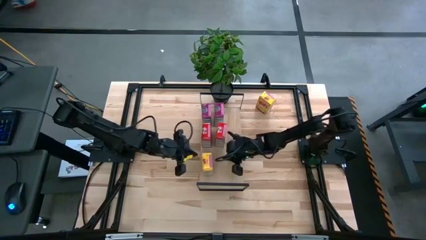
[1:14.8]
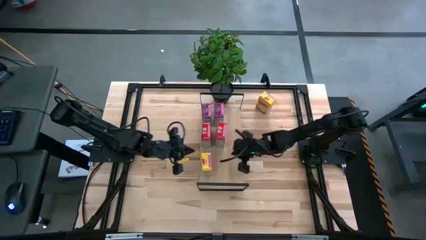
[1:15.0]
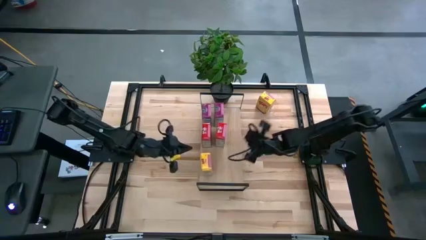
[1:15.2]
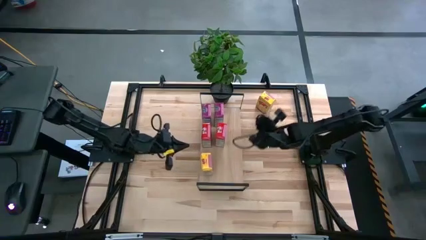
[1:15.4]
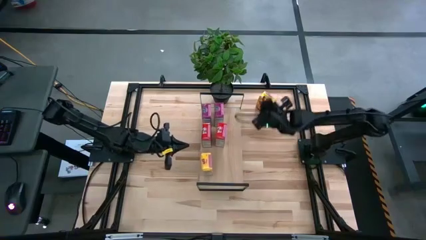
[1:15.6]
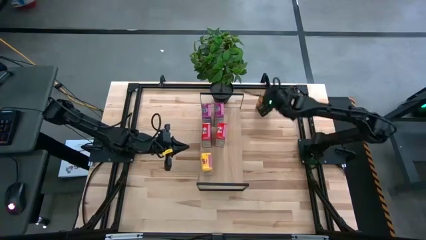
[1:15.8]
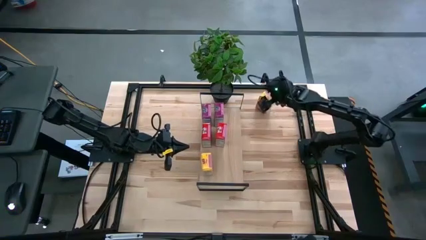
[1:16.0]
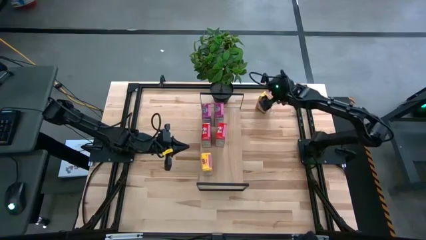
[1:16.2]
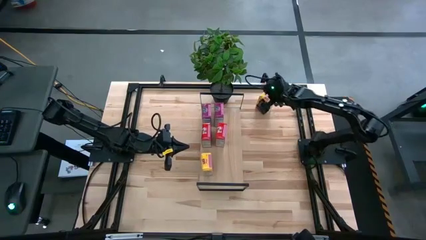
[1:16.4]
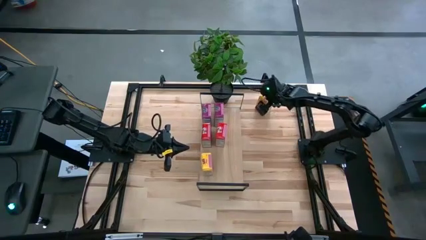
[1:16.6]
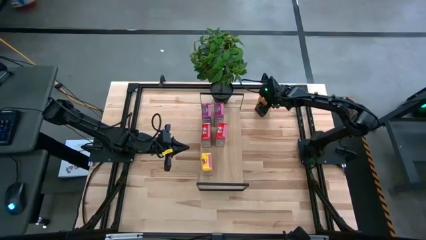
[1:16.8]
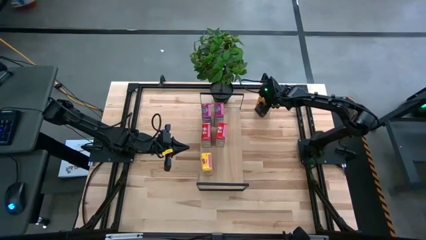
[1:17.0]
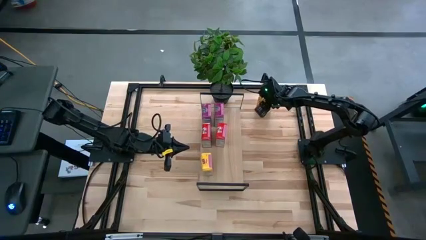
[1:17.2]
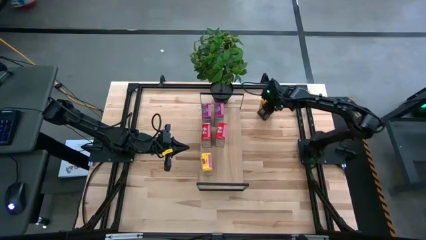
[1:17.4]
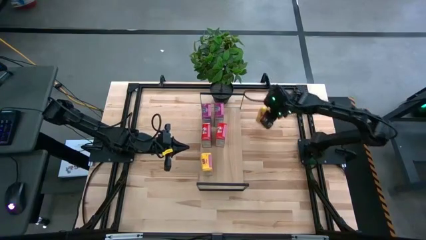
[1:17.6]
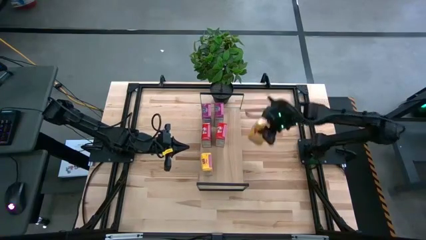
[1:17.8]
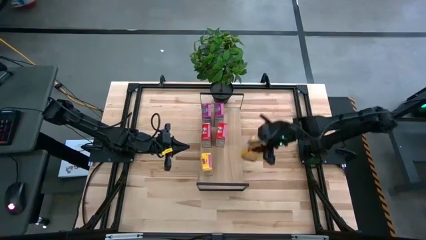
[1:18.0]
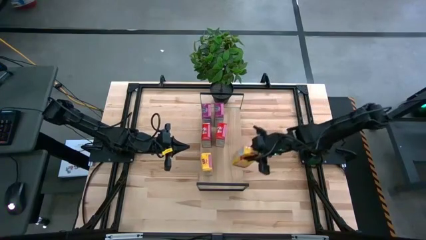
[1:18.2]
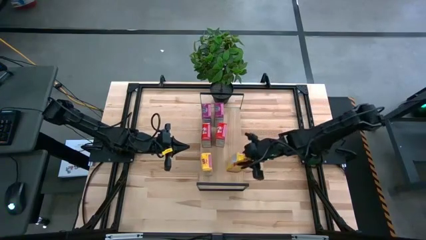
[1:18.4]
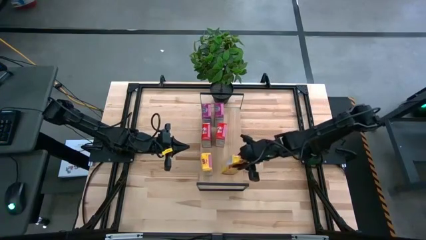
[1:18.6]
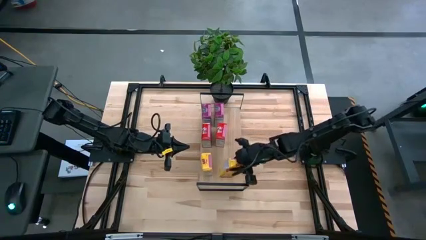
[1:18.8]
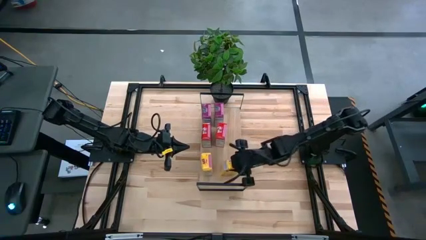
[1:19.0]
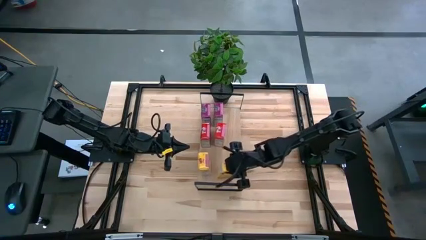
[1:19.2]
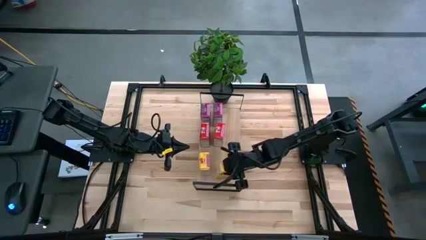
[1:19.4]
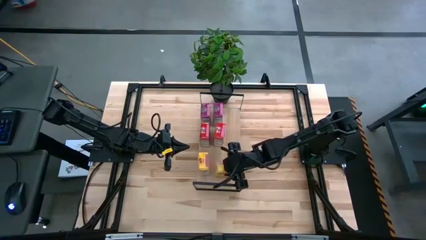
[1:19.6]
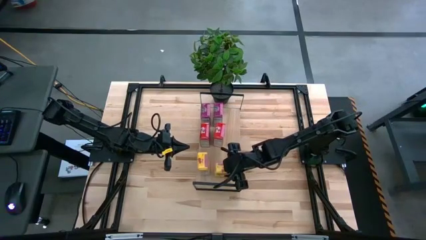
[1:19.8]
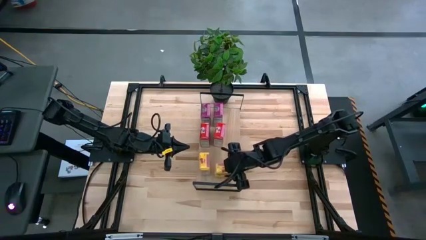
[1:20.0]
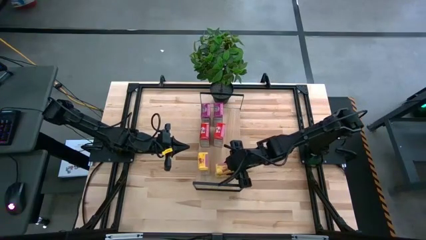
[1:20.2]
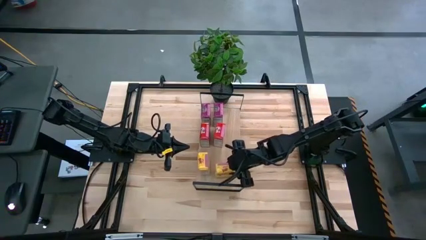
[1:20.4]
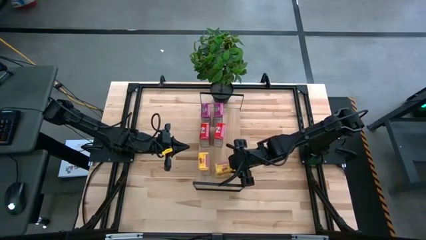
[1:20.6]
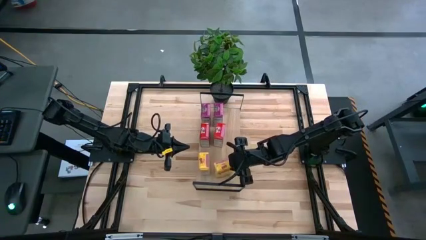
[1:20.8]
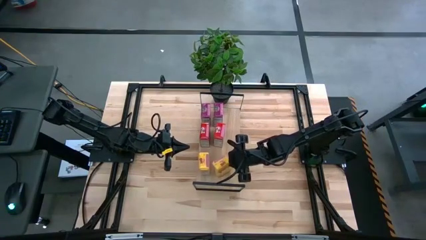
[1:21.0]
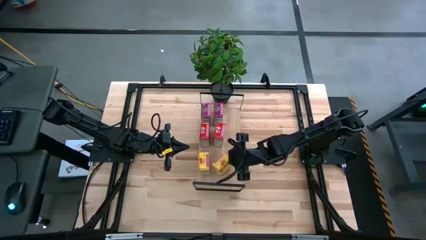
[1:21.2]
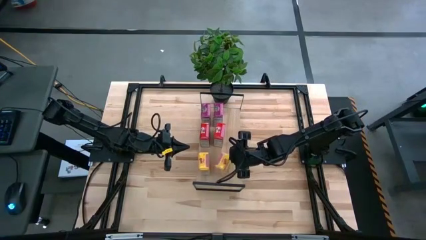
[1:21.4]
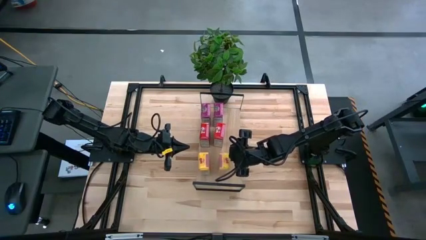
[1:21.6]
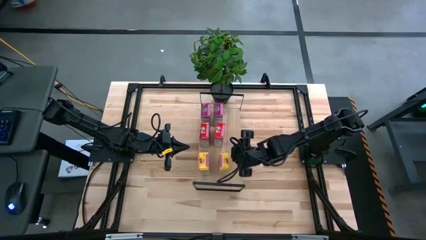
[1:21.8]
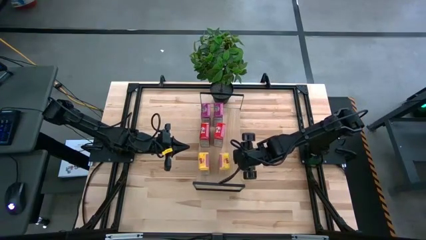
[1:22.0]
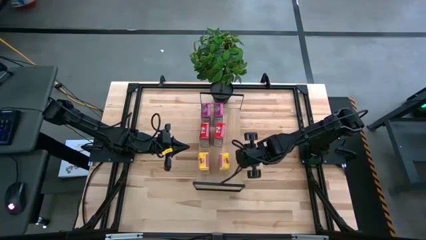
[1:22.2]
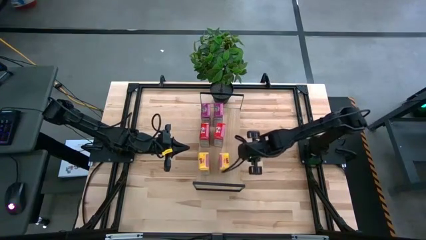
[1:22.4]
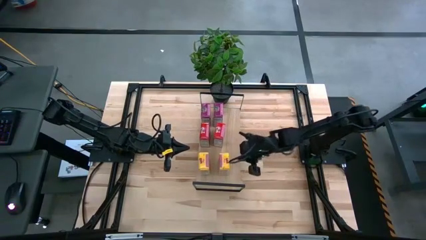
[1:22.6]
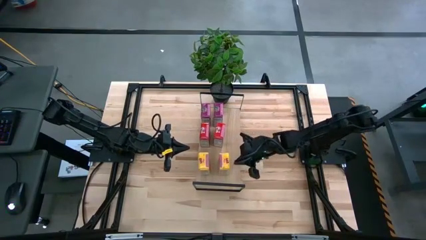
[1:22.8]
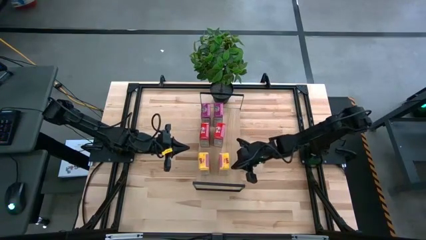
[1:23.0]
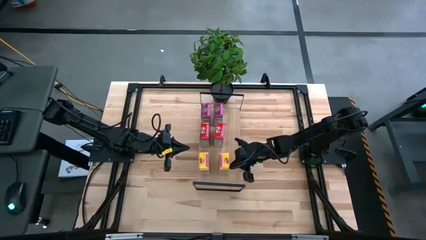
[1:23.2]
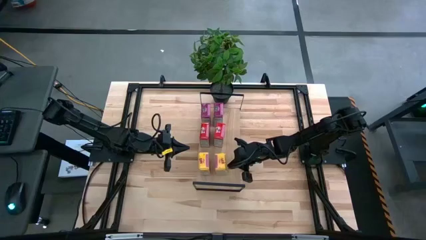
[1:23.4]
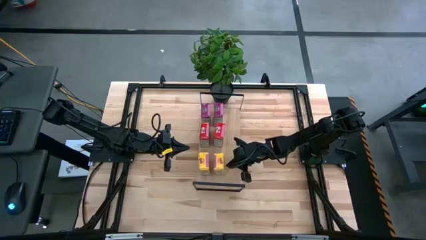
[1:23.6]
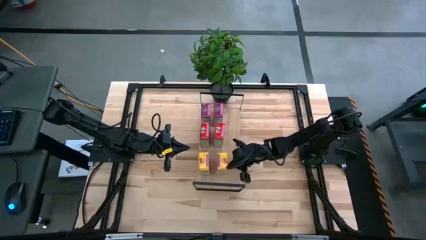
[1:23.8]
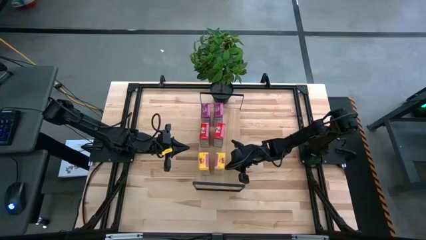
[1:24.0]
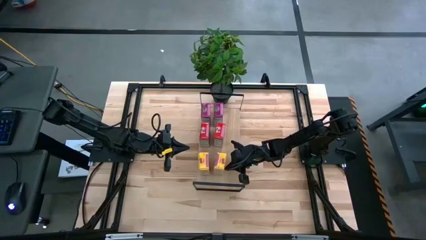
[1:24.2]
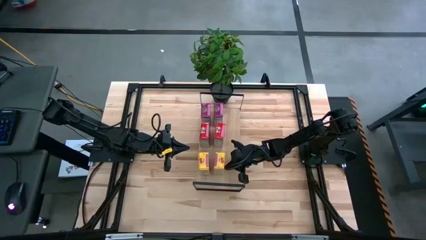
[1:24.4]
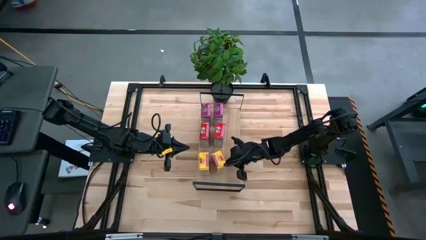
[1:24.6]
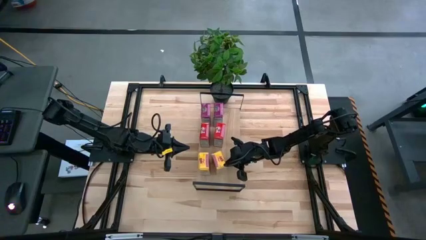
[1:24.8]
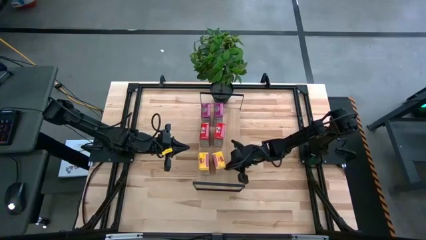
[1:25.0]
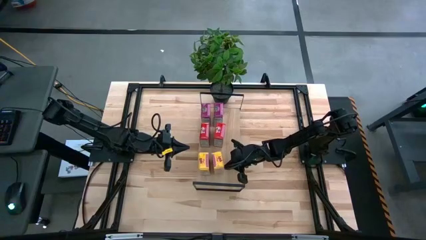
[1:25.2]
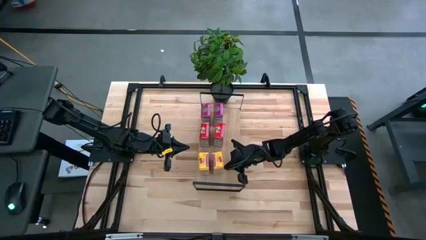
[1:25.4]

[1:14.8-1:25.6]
Task: Stack cereal on shelf
Put the yellow cereal box on the shelf aligned with the other yellow cereal box

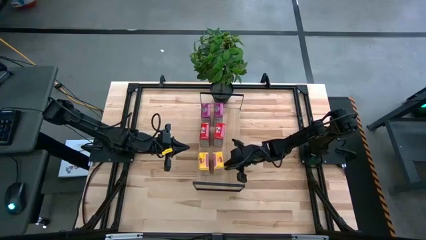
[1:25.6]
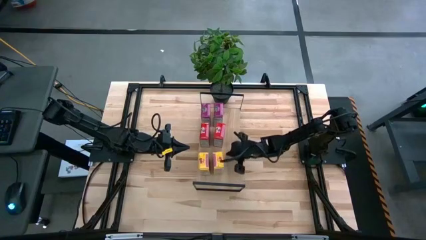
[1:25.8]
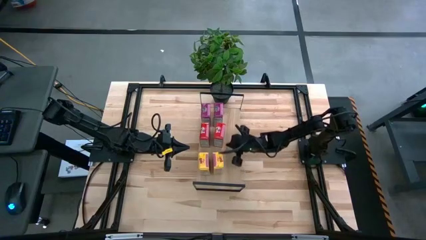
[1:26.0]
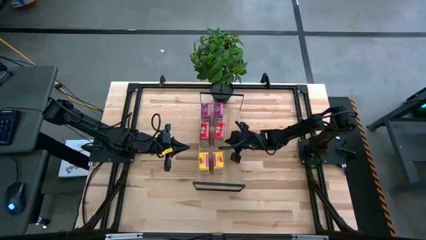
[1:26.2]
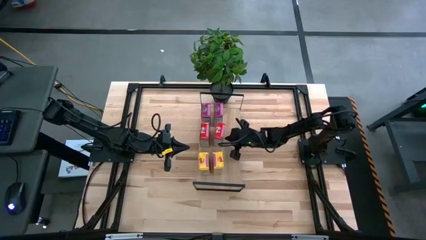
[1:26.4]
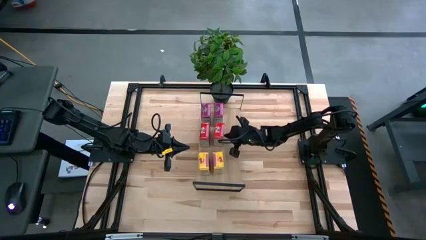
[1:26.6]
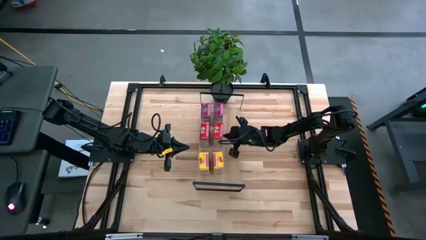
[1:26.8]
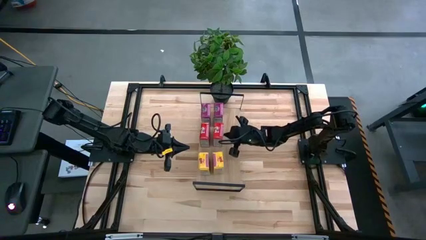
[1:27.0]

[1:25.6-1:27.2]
Adjust the right red cereal box on the shelf

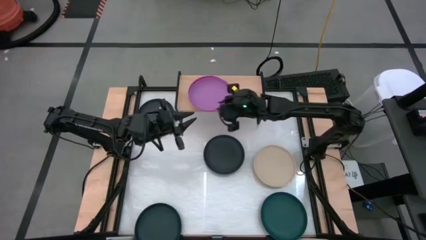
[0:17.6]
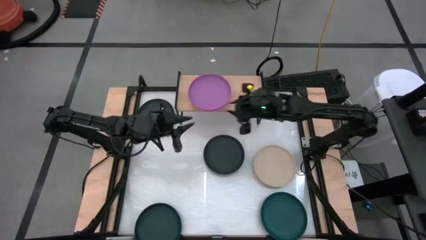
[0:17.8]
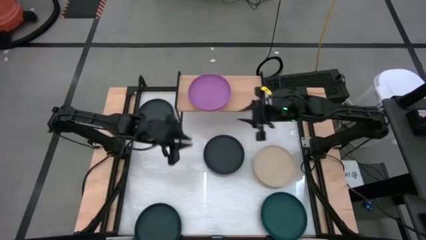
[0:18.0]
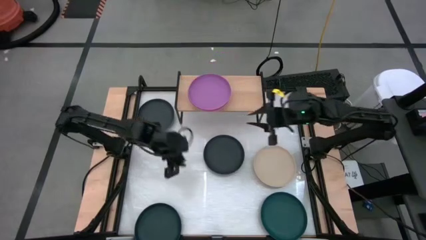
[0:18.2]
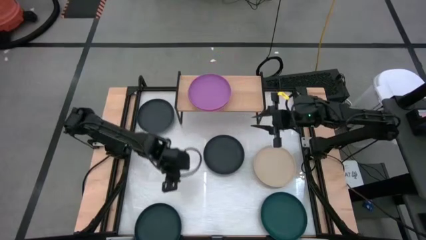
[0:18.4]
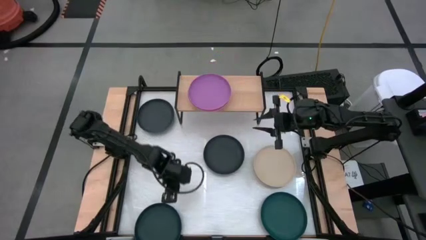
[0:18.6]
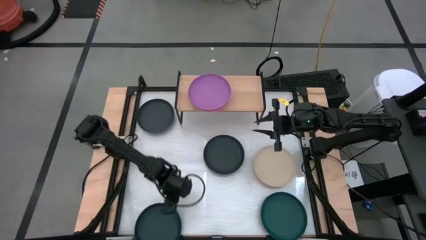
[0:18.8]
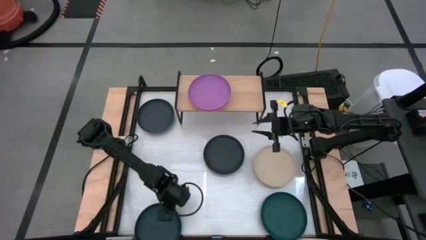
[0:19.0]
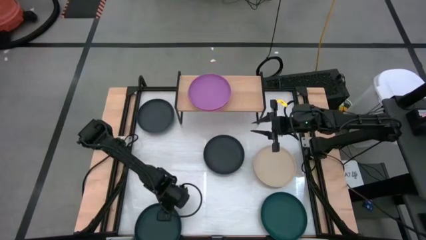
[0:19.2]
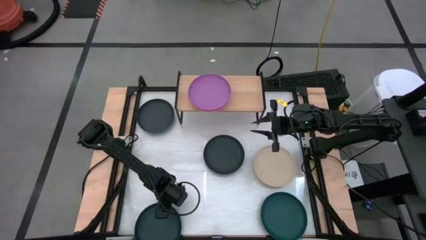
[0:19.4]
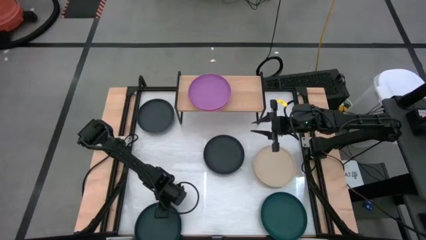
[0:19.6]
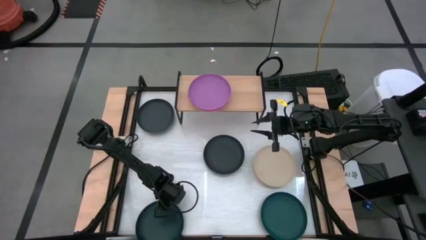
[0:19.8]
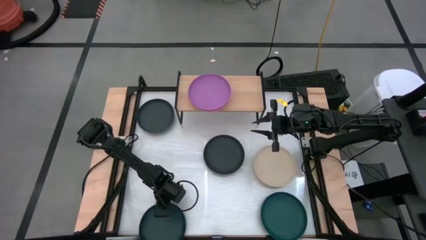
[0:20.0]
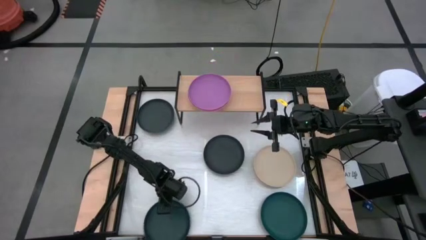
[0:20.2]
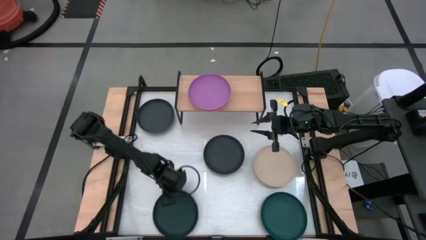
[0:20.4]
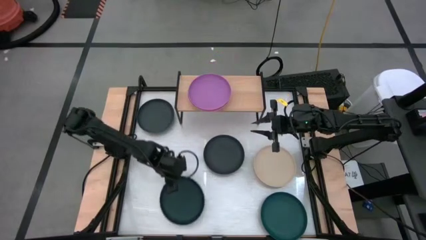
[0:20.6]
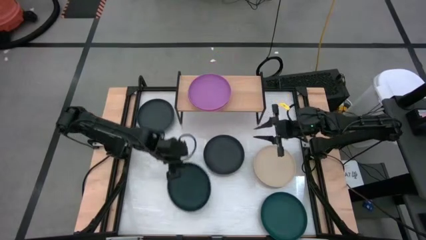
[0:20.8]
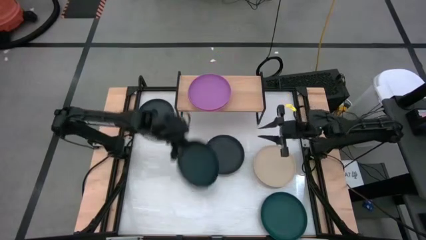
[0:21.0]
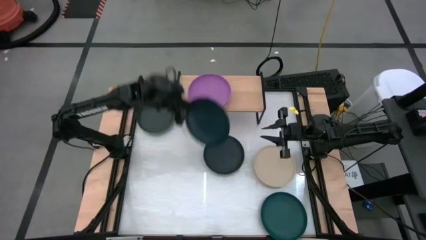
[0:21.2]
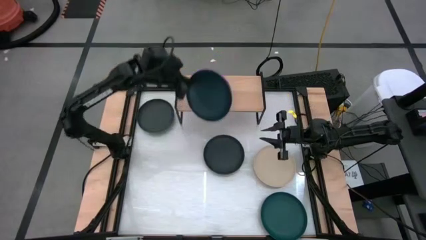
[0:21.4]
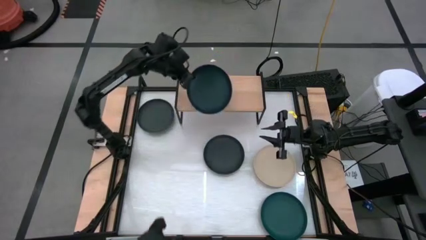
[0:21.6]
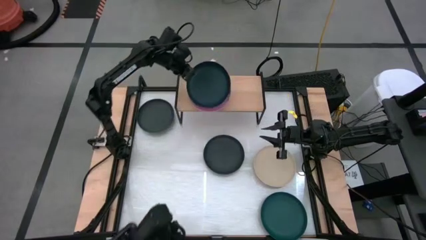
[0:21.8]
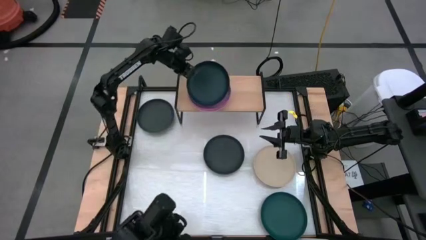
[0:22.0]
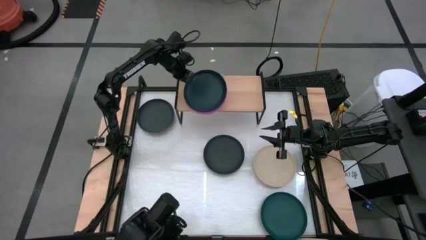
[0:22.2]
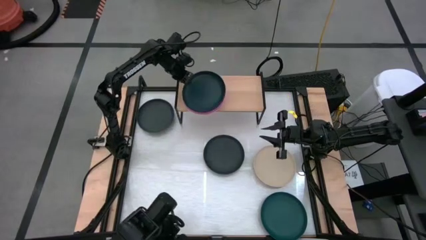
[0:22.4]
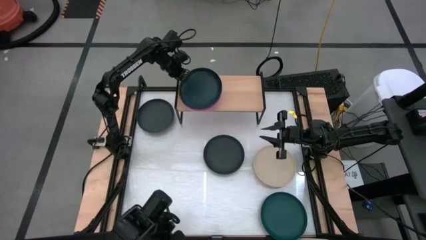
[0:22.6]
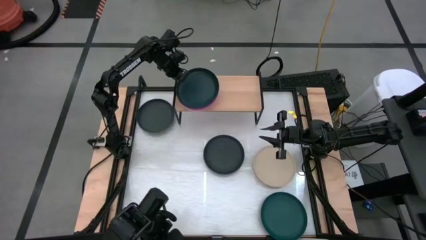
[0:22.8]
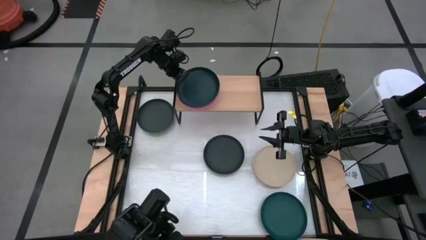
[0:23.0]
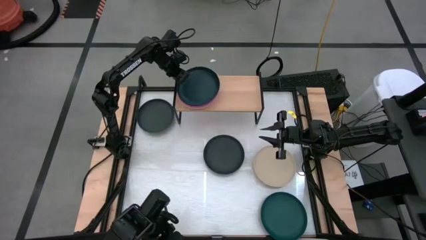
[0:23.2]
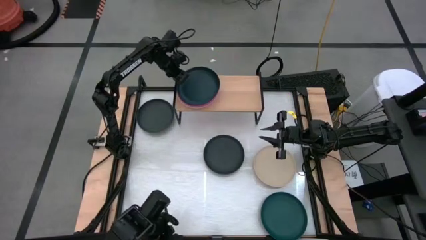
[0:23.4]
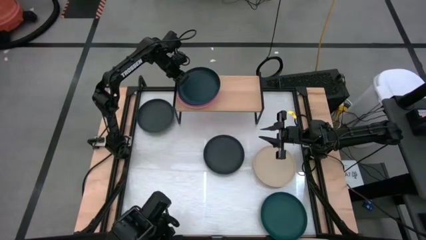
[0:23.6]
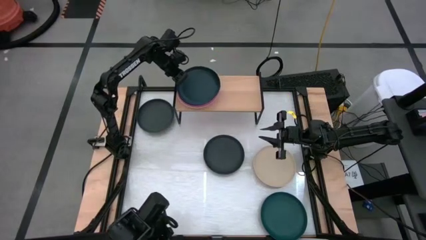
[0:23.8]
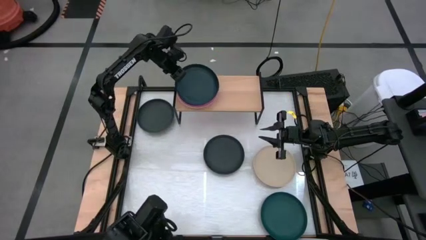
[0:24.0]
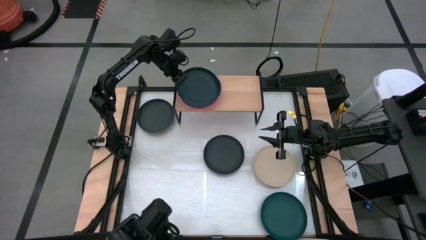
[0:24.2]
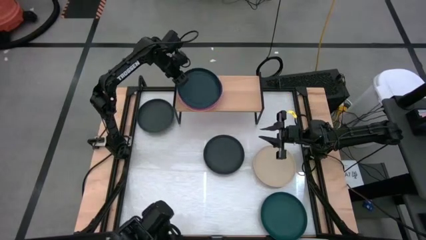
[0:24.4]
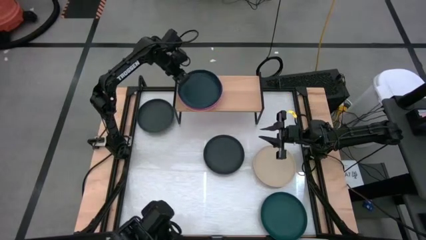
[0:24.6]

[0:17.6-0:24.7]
Task: Place and stack plates onto a shelf
Stack the dark green plate on top of the purple plate on the shelf
